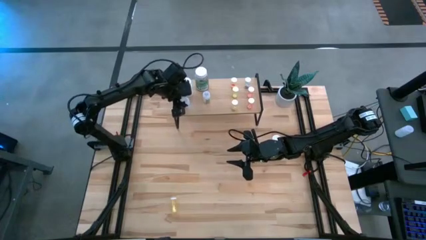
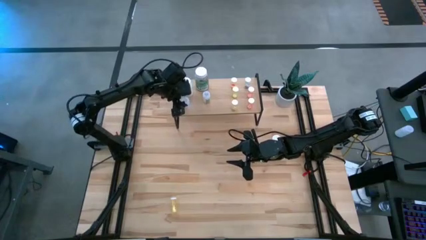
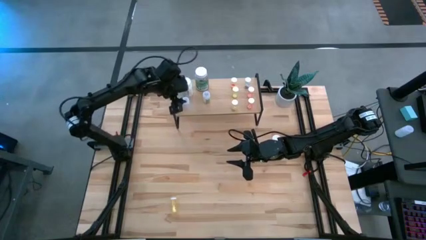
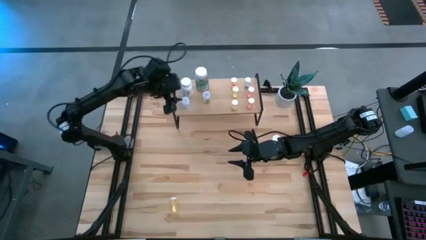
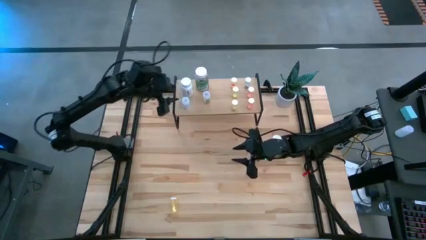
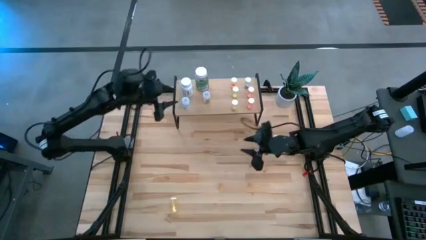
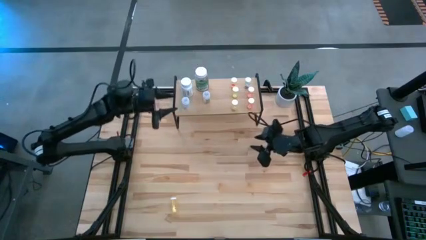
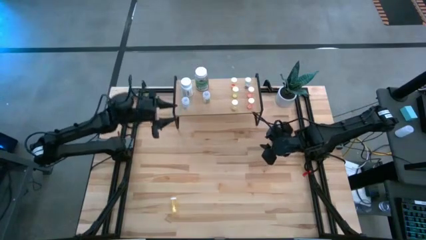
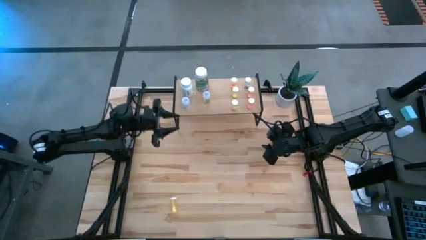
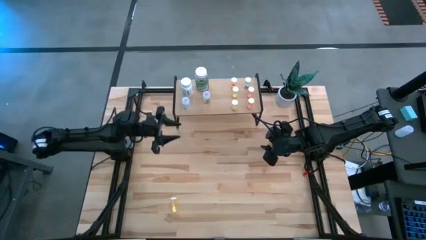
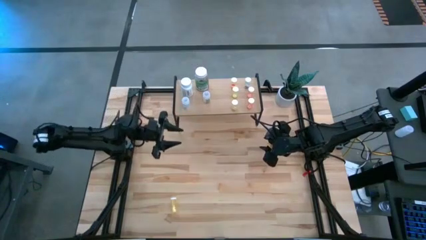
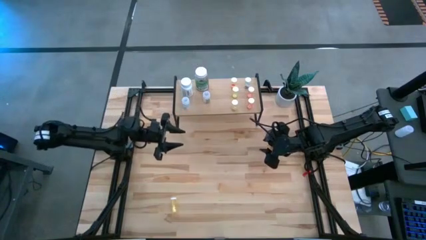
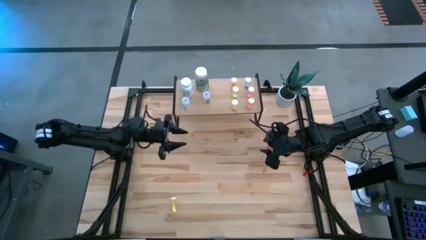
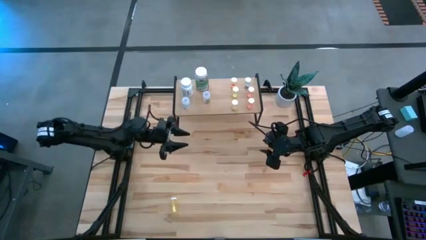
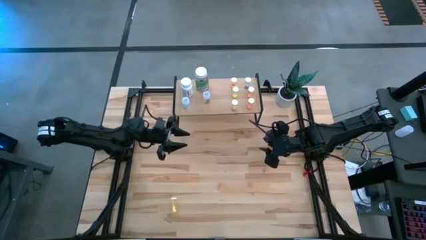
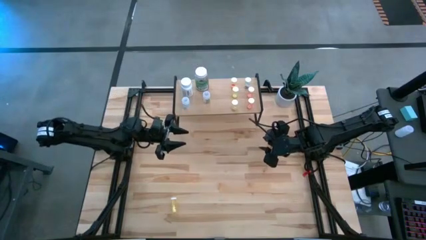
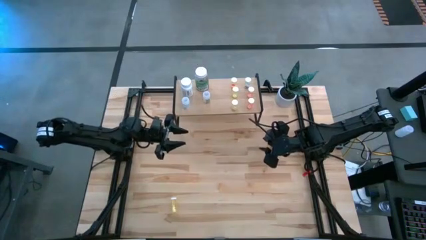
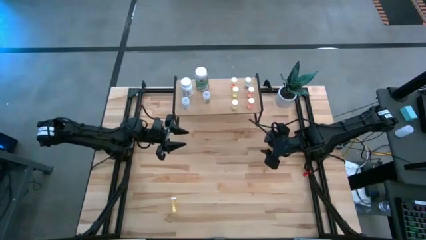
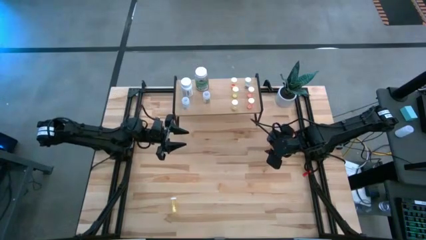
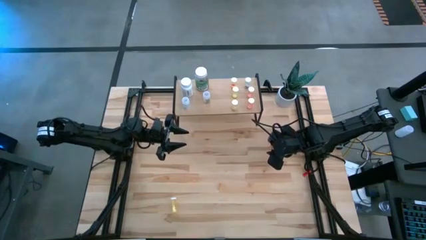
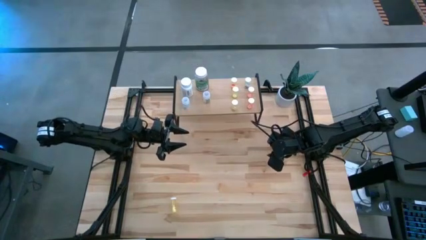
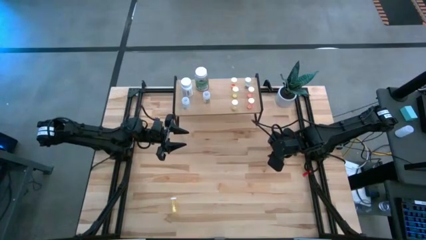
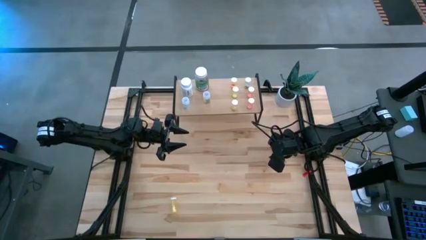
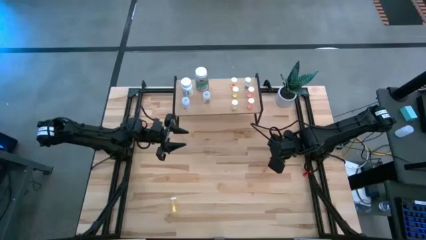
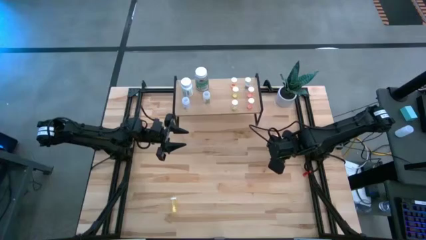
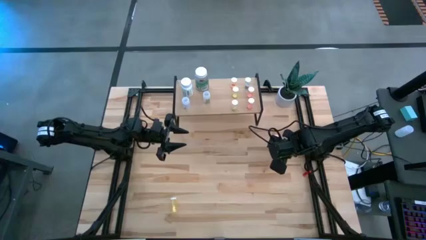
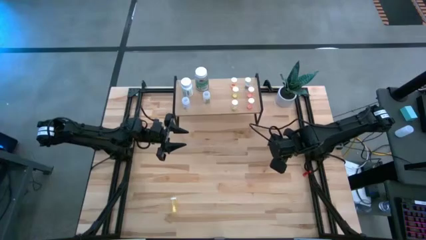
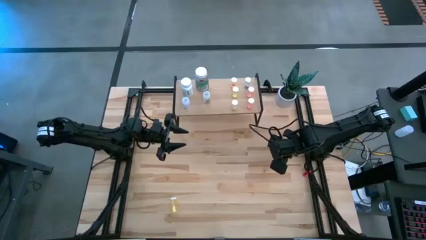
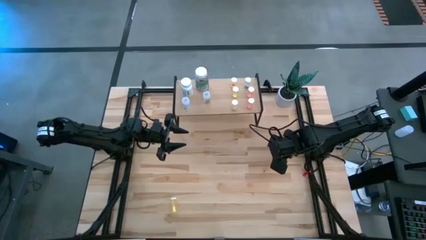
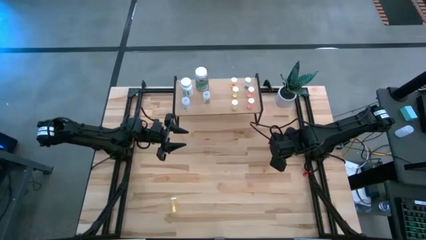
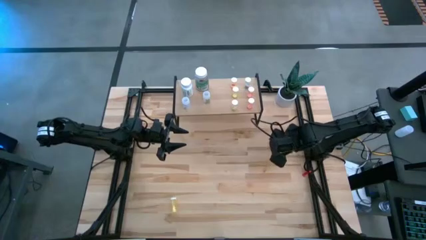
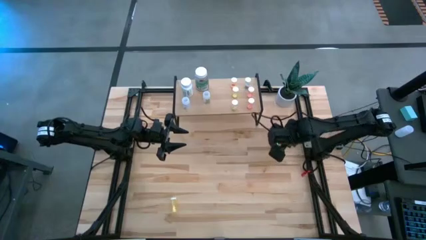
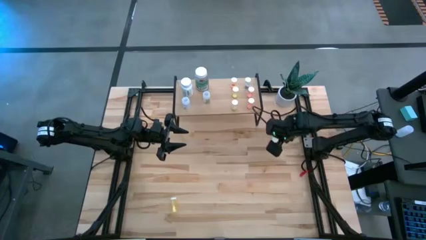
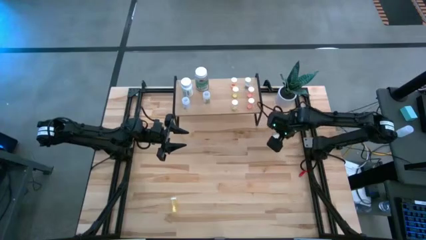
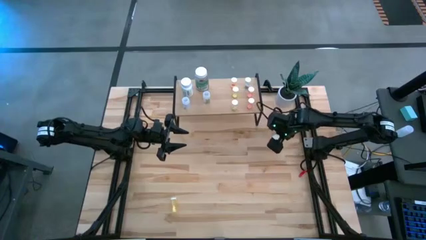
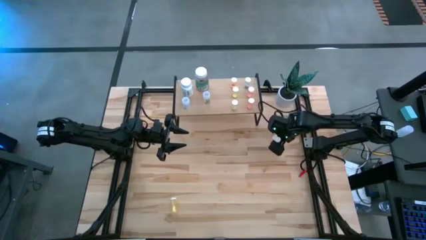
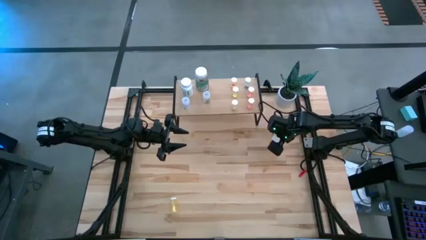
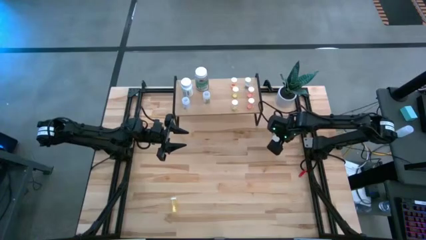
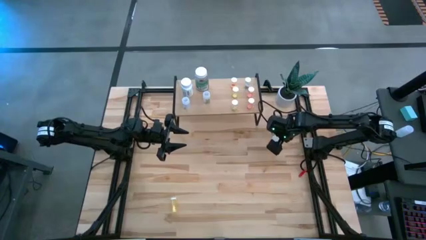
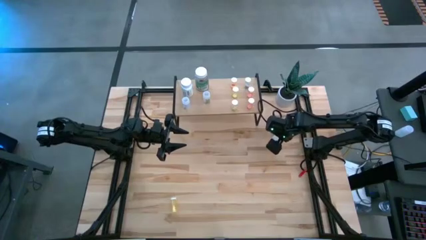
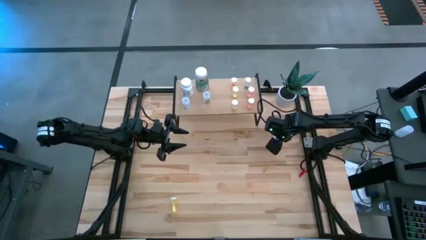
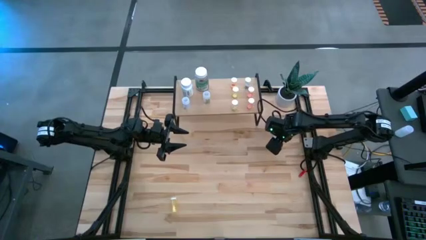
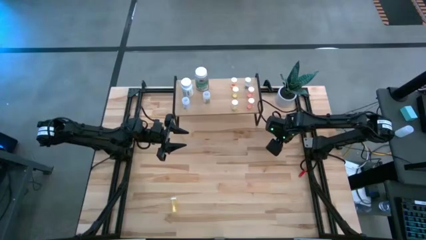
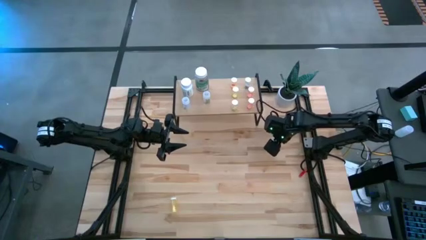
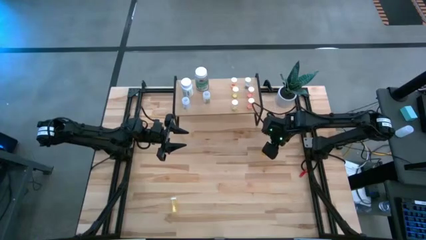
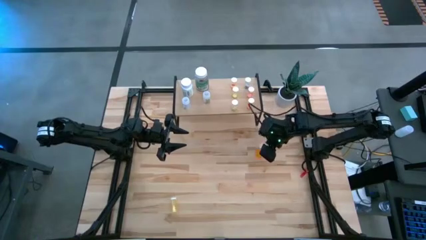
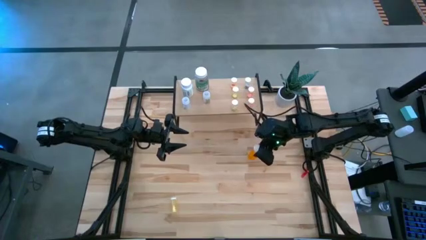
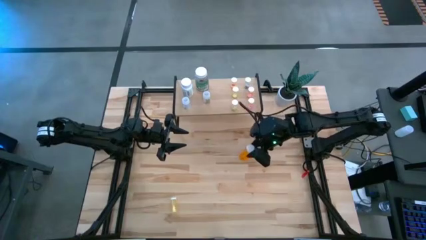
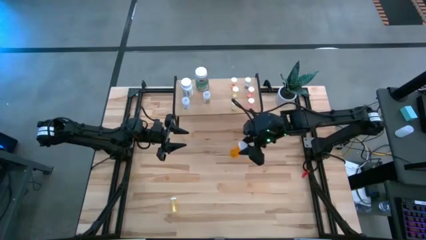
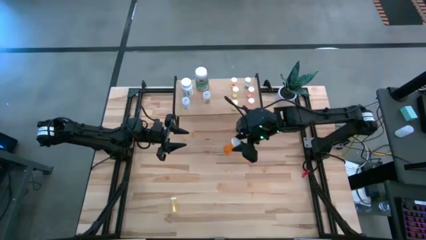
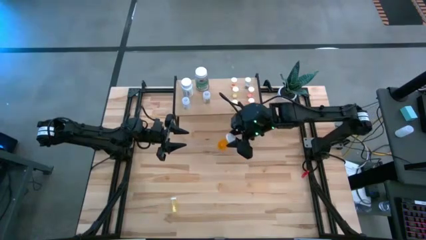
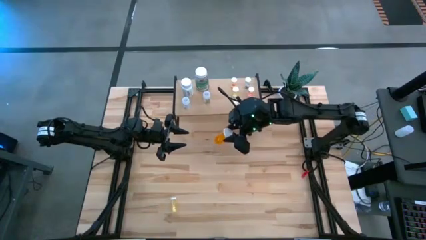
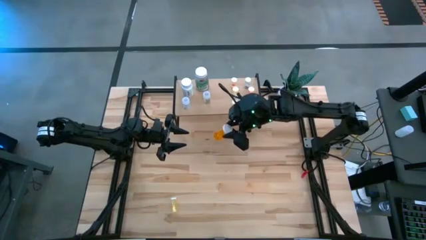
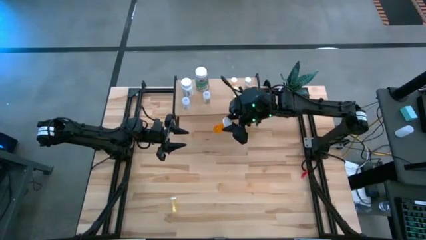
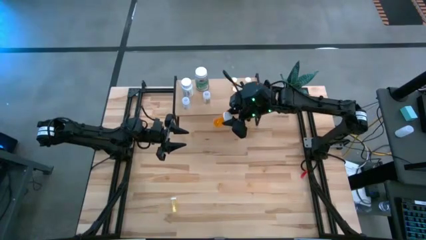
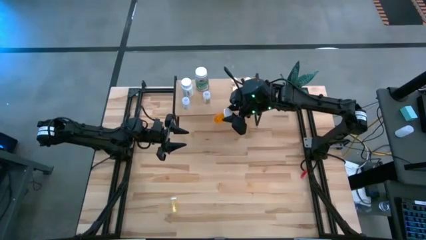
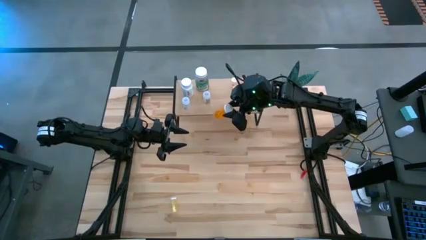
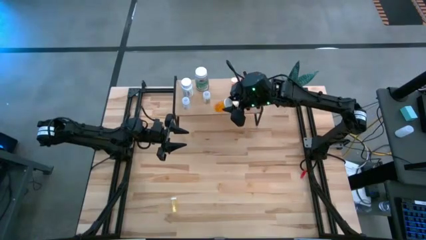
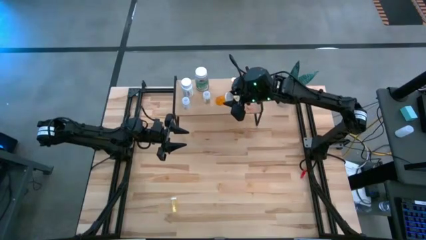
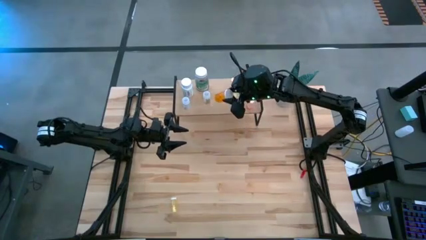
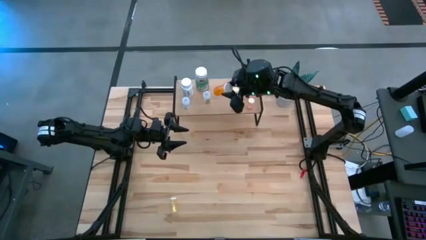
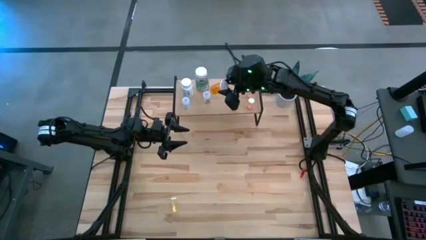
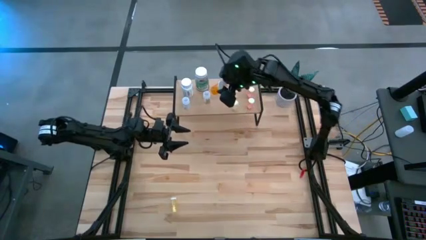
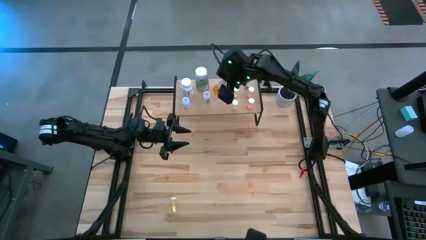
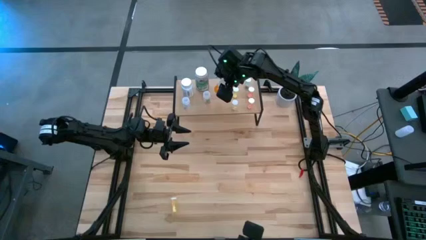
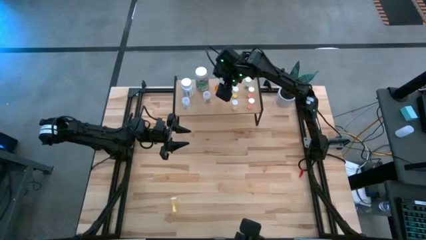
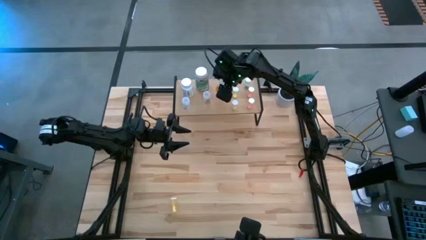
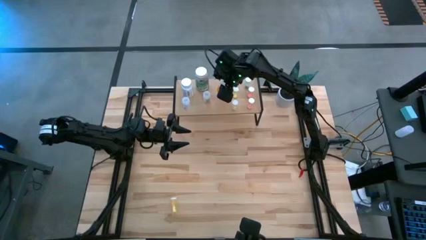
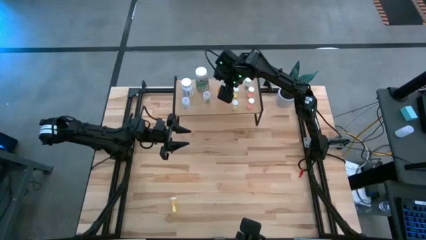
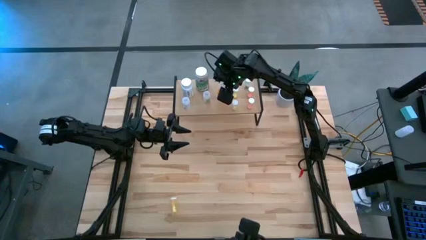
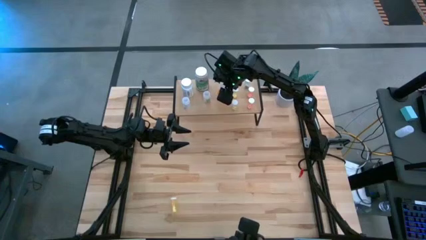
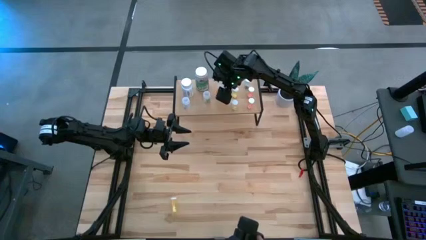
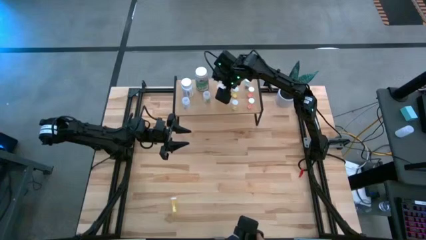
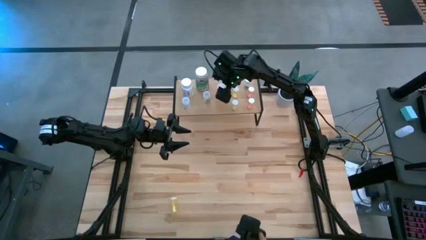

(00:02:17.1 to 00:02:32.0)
Task: Pick and place medicine bottles onto shelf by color
Put the big orange pill bottle on the shelf
